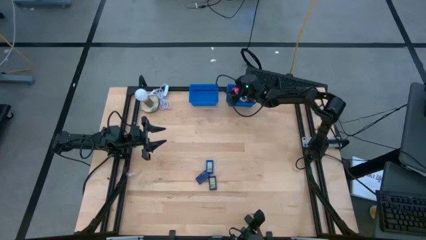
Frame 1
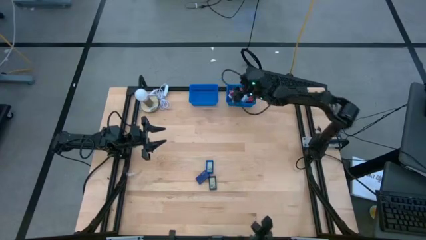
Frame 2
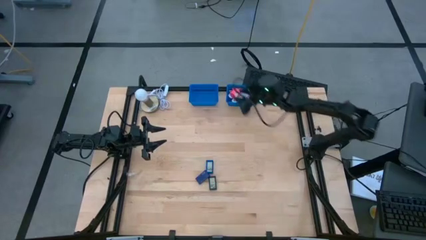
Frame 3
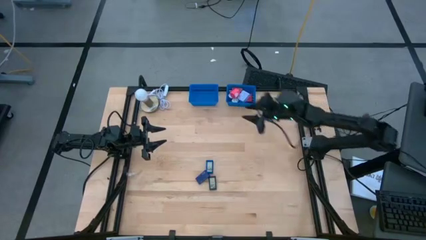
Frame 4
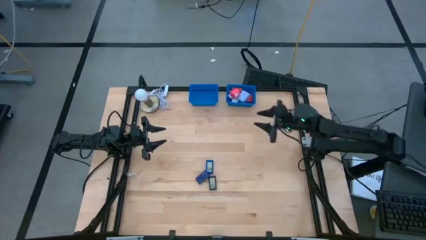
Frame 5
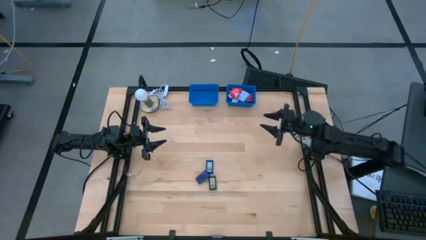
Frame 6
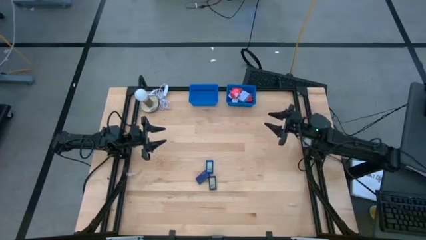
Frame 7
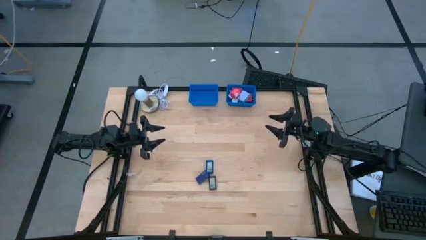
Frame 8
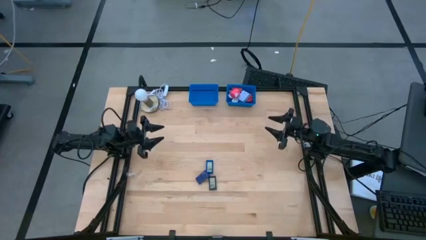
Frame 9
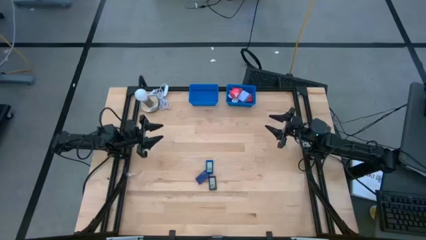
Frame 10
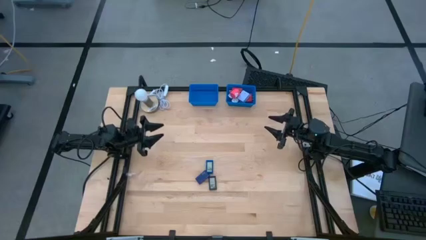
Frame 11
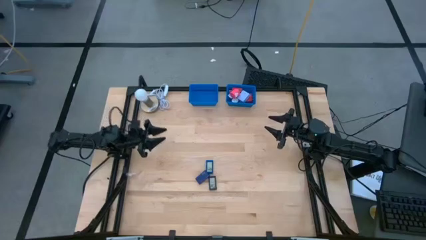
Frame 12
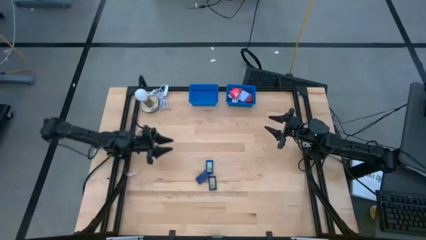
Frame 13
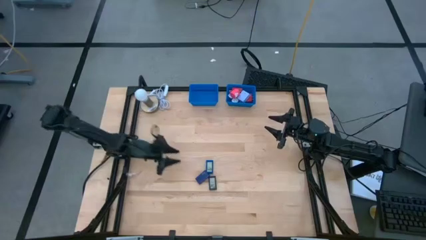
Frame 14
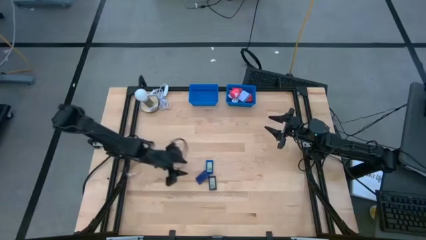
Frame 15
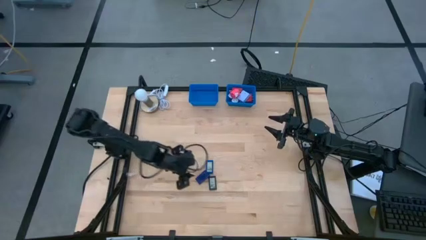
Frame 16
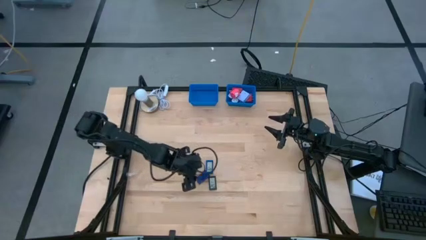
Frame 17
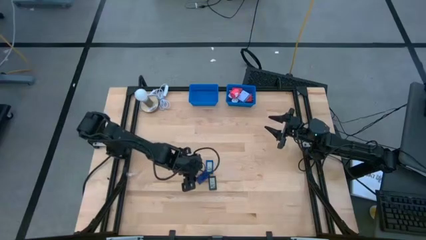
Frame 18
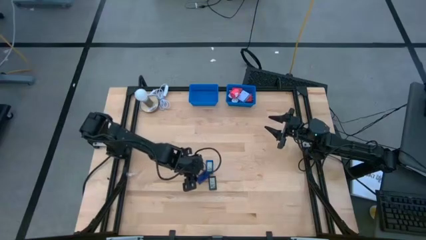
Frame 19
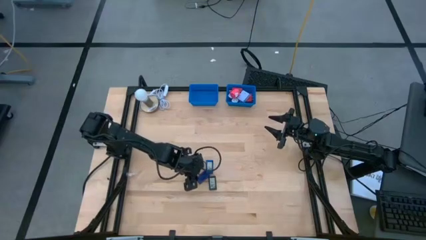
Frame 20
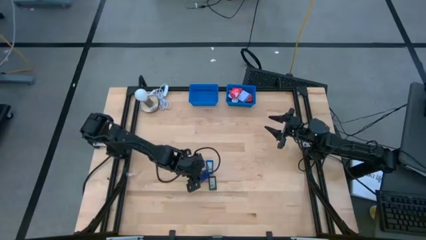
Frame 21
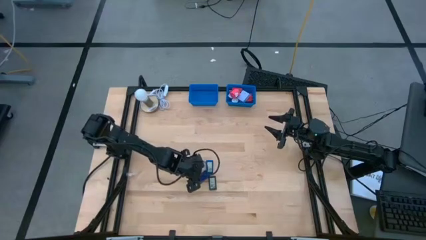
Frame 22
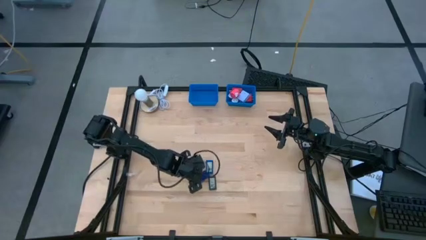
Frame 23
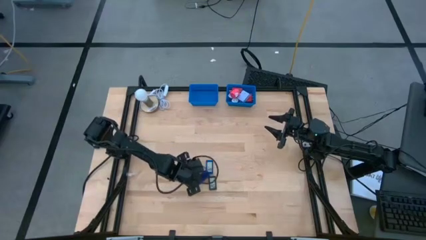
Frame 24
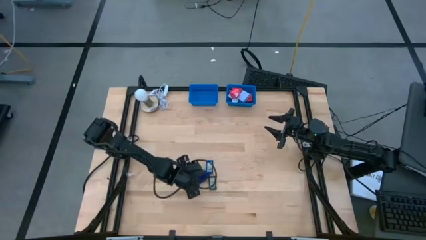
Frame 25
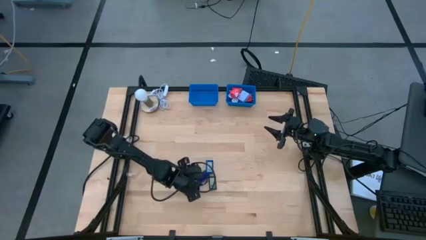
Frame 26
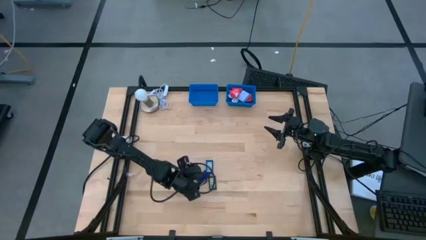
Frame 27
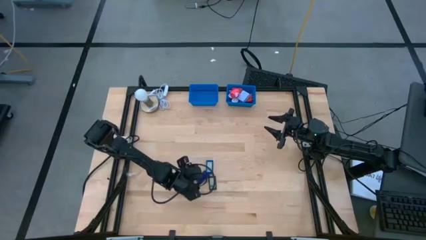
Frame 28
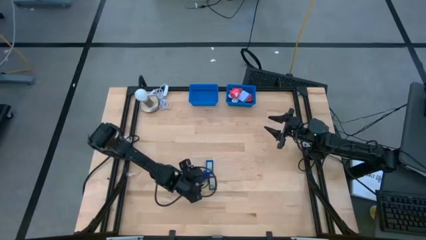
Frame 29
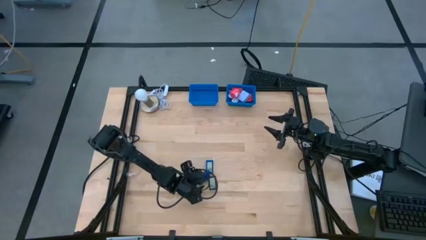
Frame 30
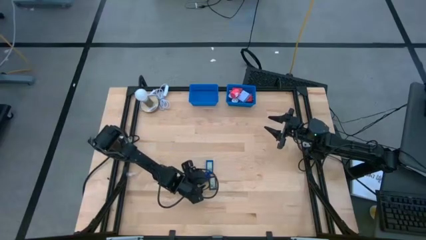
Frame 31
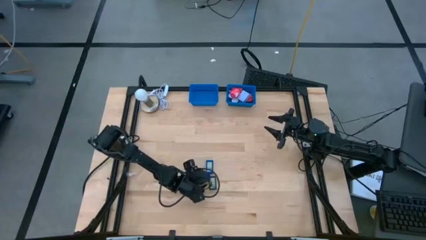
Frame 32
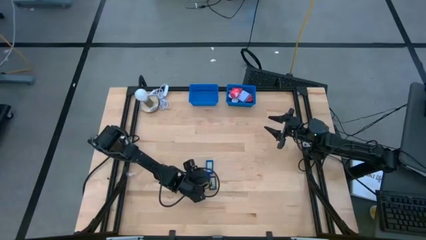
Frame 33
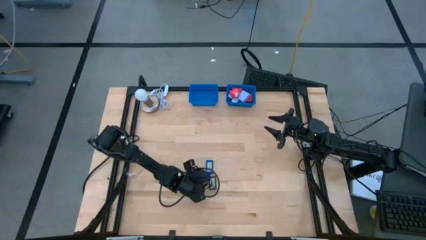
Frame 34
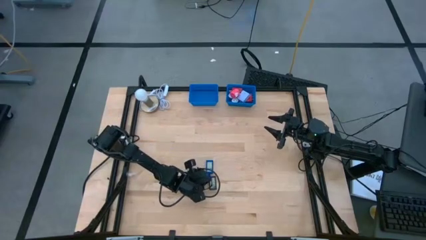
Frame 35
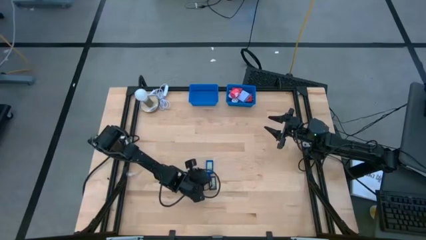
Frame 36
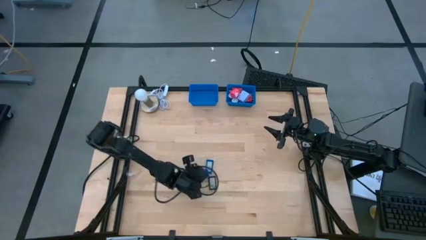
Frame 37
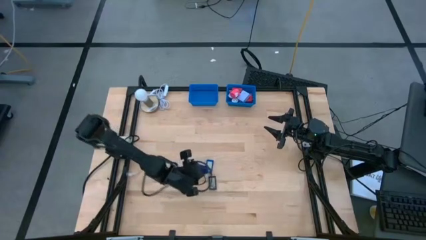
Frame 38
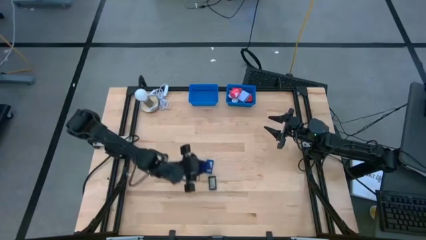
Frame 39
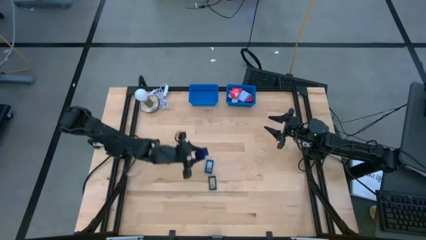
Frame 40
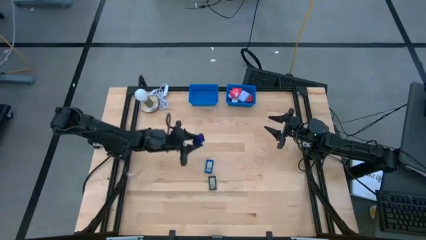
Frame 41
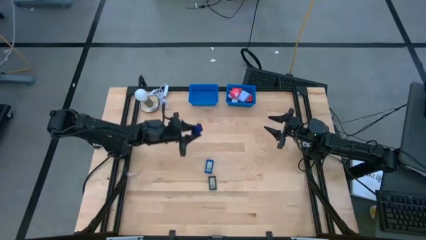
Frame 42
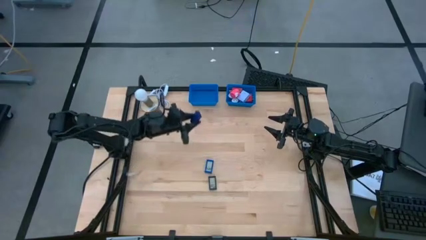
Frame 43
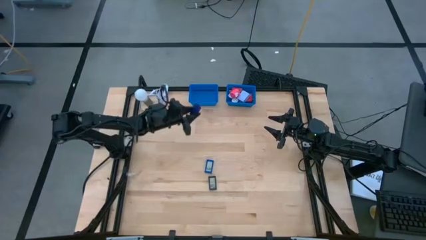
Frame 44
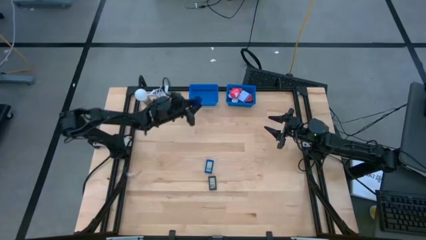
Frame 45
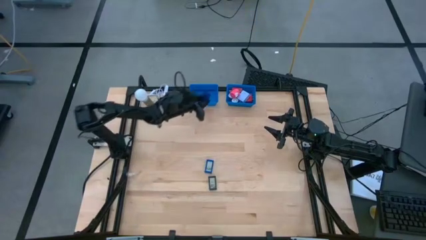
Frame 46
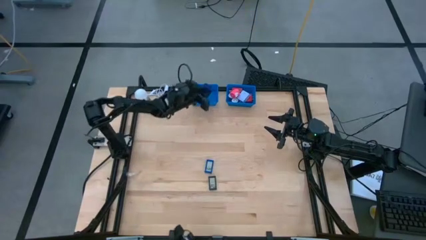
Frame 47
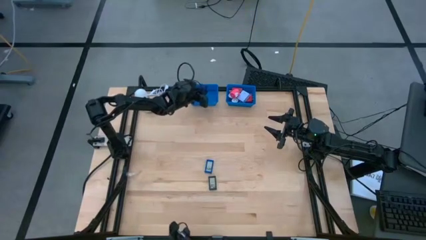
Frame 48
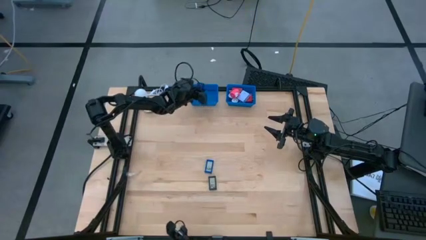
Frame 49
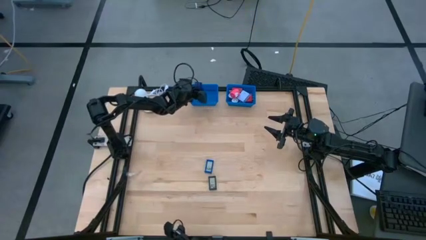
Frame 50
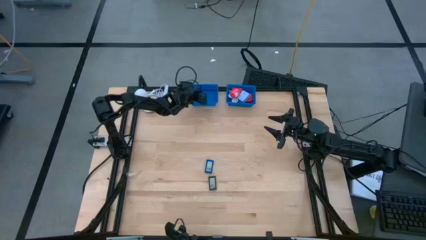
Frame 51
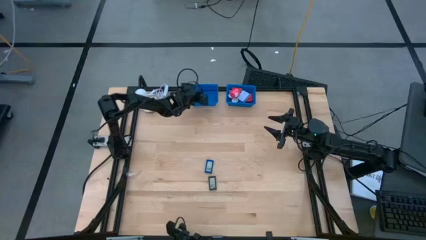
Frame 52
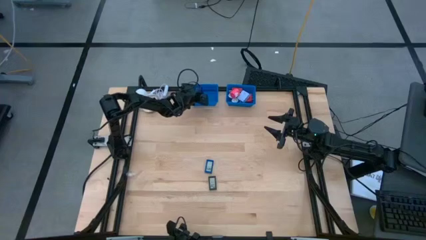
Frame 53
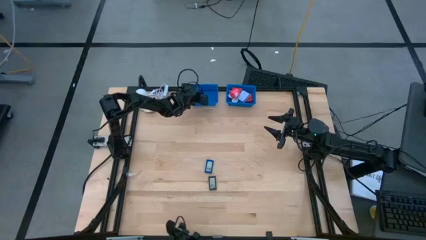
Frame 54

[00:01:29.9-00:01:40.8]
Task: Pick & Place Office items
Put the dark blue digital timer into the left blue bin

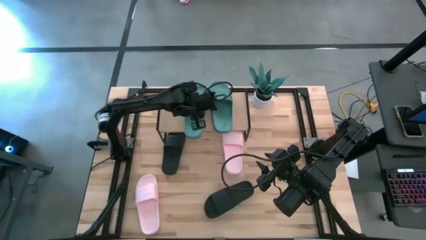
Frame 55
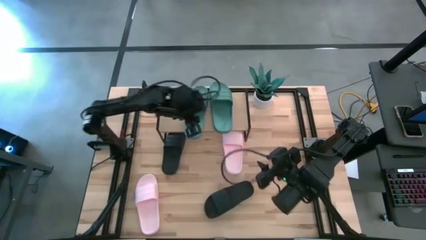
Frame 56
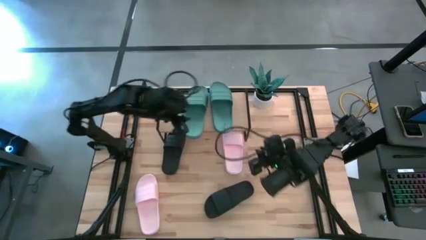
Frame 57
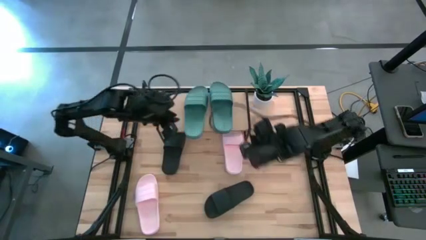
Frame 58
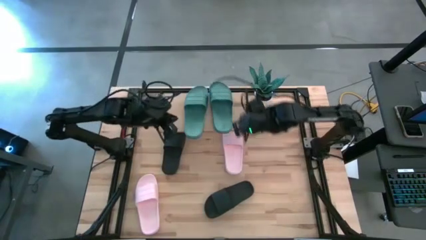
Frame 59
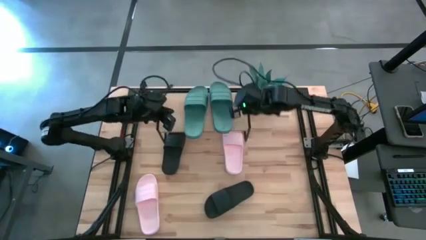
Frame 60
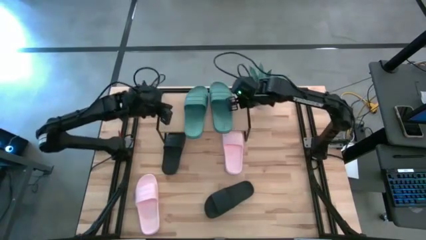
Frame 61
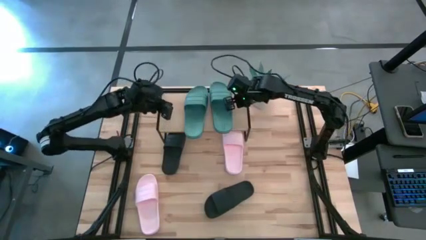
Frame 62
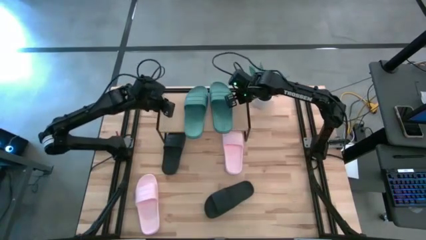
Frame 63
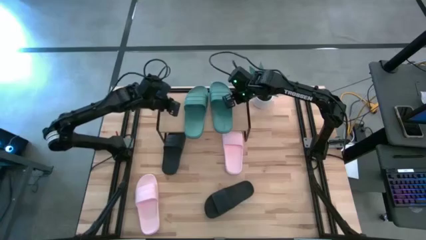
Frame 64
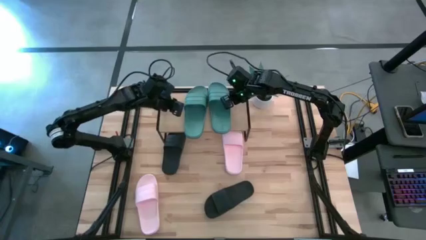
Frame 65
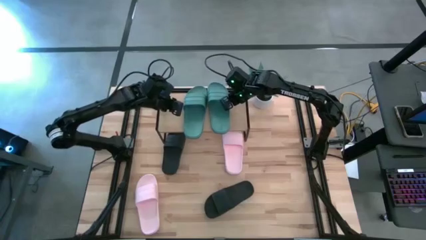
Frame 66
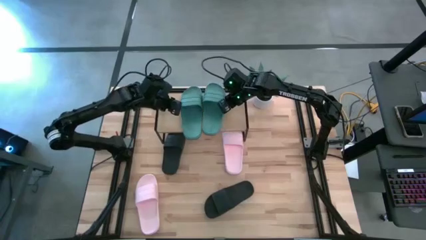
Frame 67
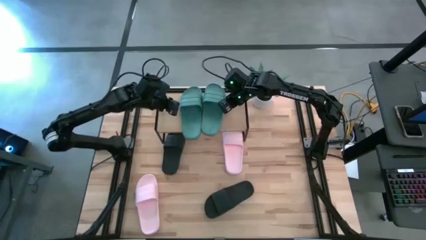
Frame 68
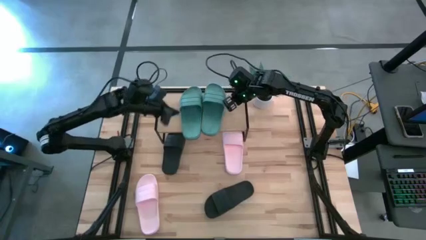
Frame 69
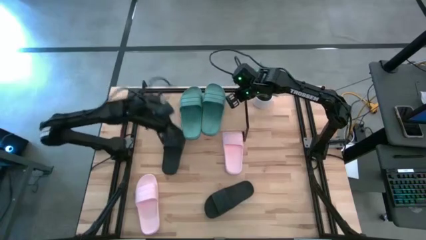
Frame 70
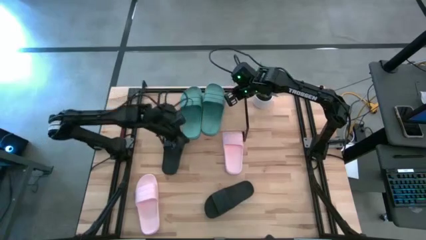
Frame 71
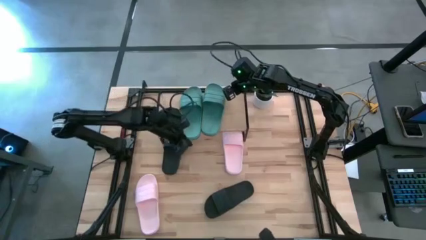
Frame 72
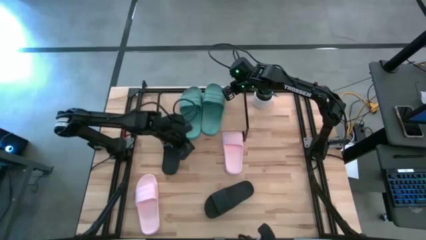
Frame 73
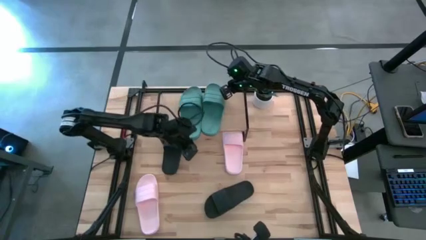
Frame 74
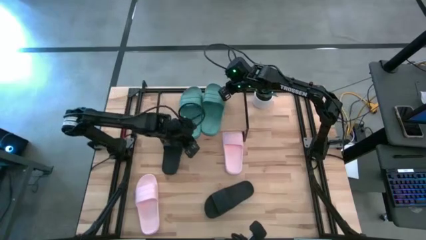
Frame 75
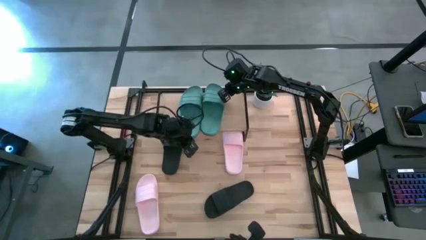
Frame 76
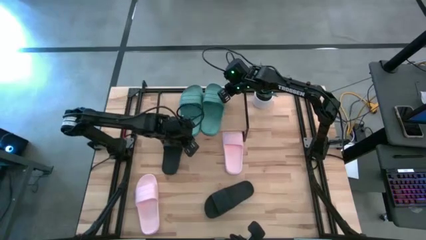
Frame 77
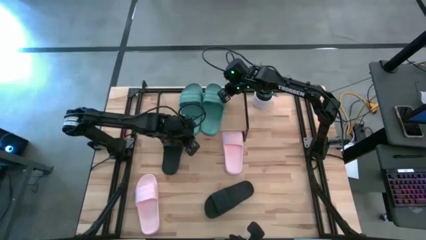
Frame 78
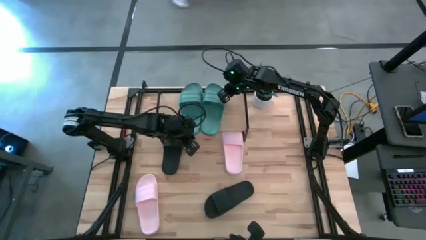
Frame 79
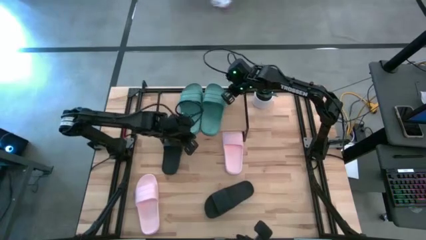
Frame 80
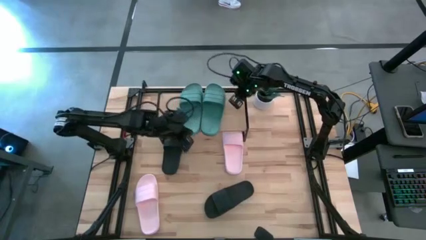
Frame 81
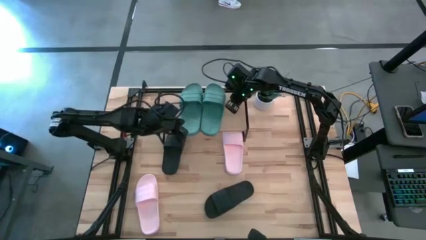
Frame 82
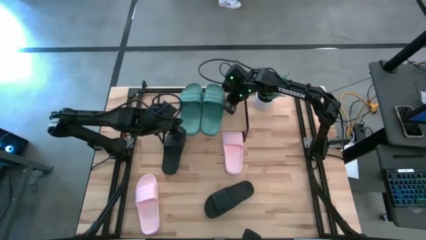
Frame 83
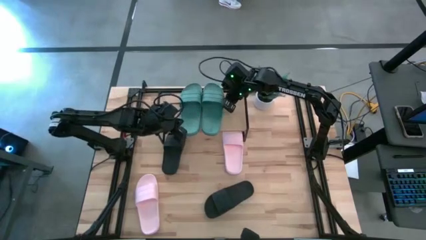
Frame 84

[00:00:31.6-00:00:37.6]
Task: Pick and place slides into the shelf
Adjust the green slides on the shelf
